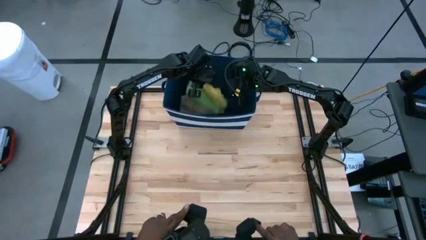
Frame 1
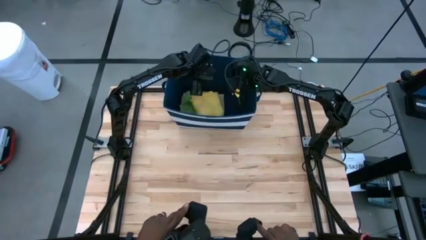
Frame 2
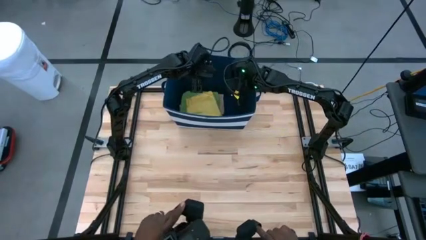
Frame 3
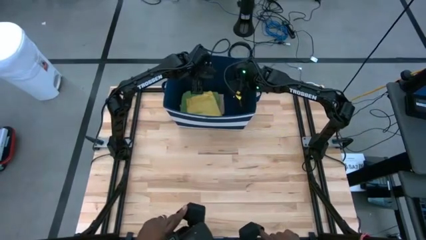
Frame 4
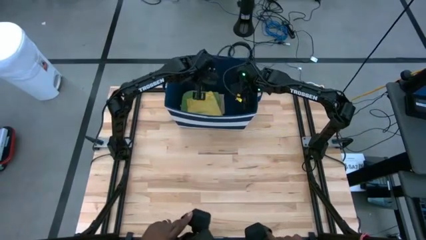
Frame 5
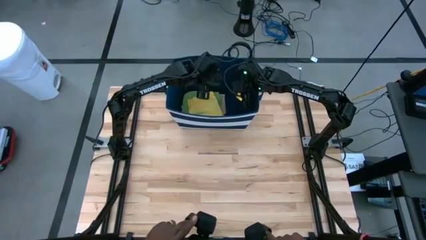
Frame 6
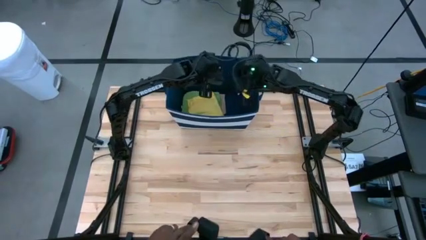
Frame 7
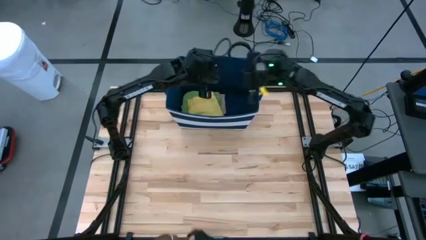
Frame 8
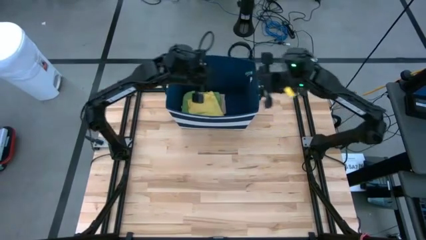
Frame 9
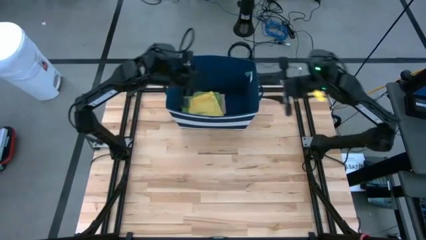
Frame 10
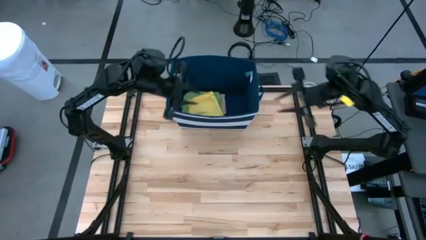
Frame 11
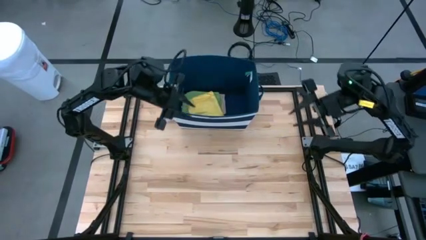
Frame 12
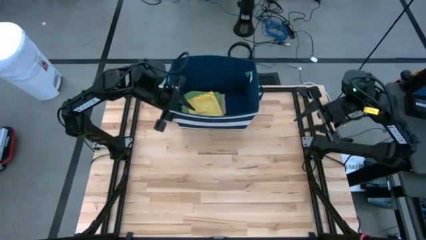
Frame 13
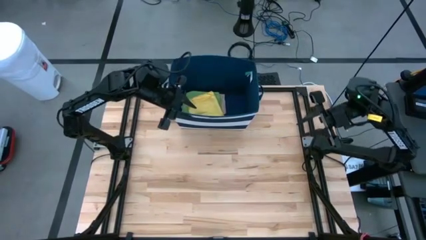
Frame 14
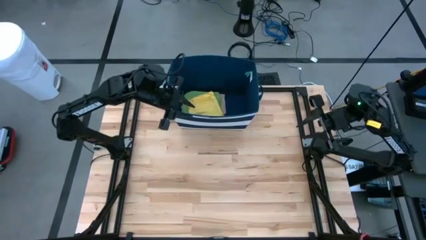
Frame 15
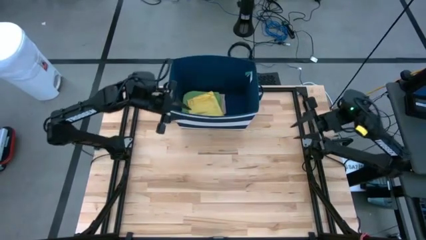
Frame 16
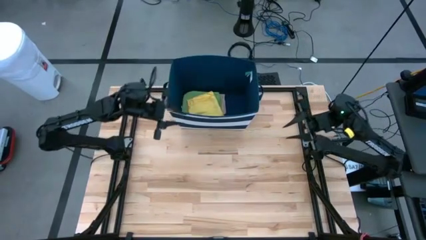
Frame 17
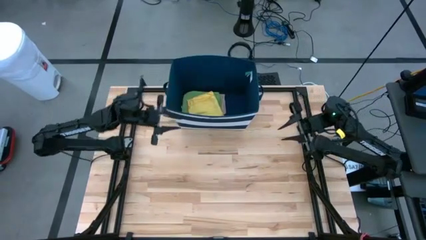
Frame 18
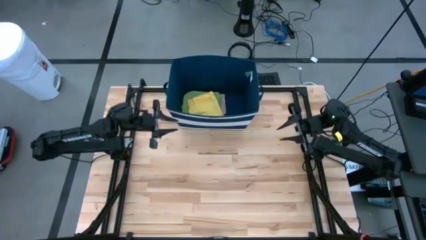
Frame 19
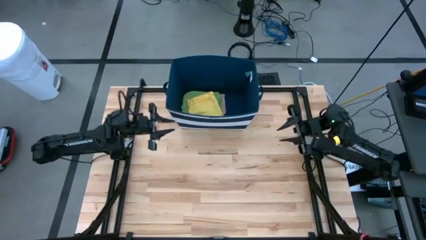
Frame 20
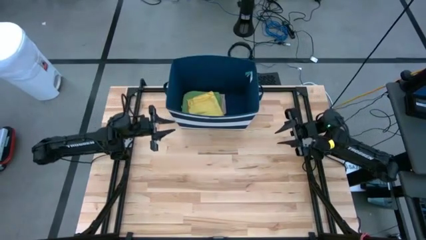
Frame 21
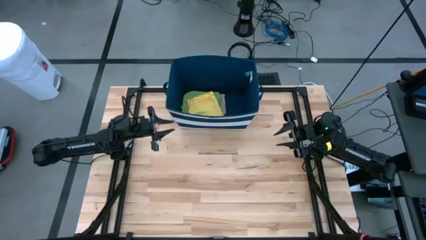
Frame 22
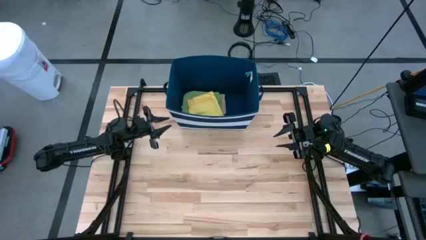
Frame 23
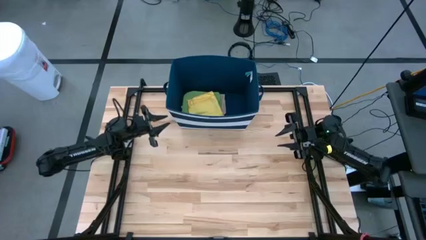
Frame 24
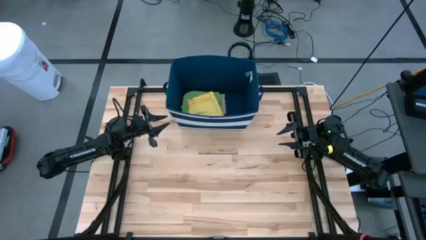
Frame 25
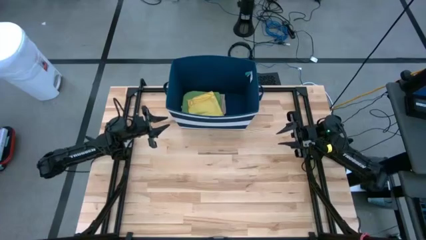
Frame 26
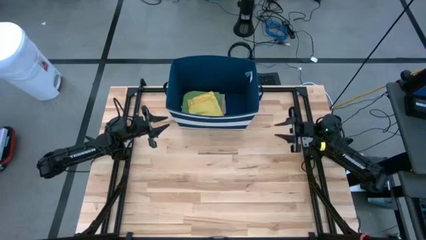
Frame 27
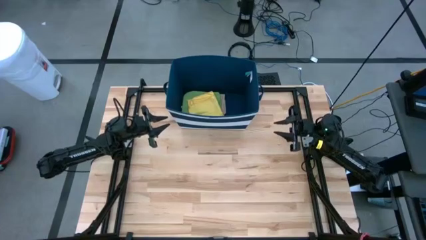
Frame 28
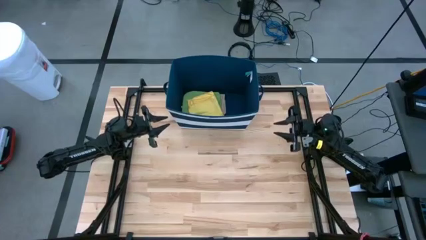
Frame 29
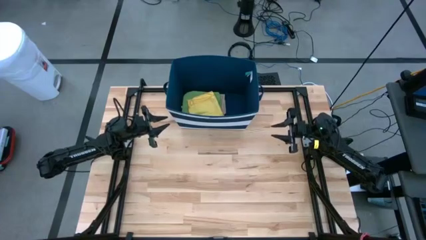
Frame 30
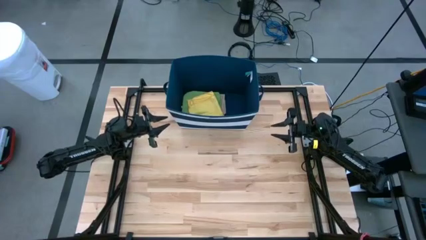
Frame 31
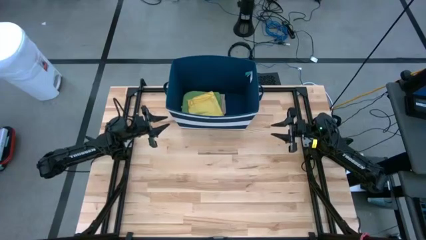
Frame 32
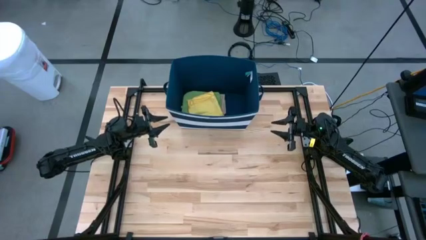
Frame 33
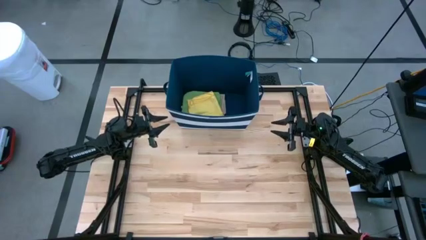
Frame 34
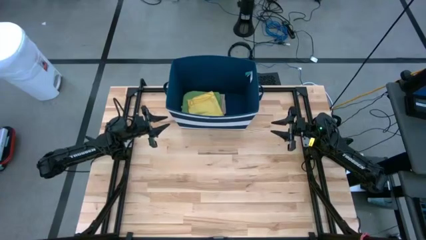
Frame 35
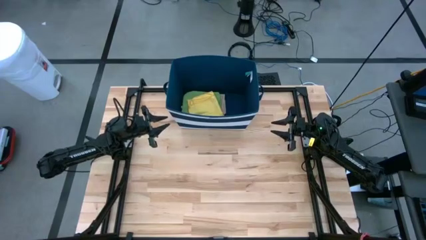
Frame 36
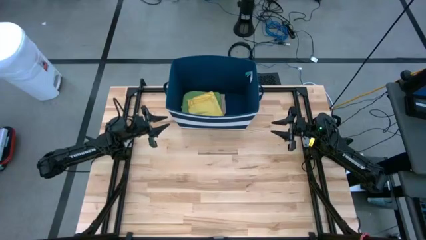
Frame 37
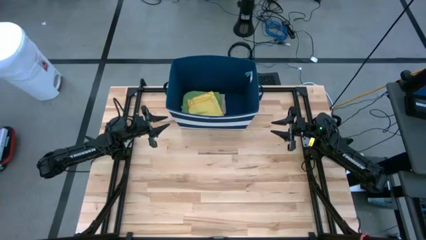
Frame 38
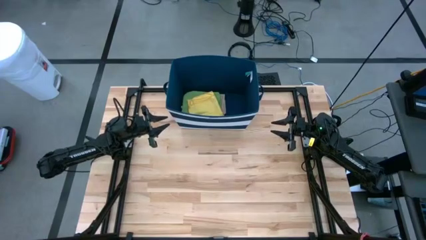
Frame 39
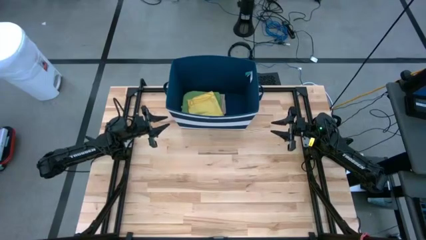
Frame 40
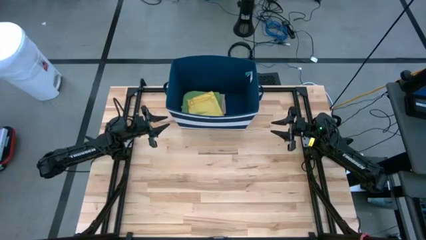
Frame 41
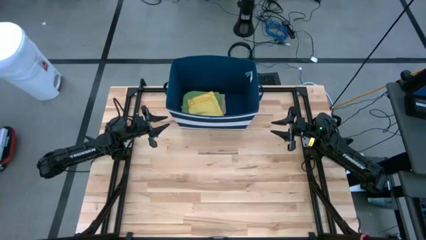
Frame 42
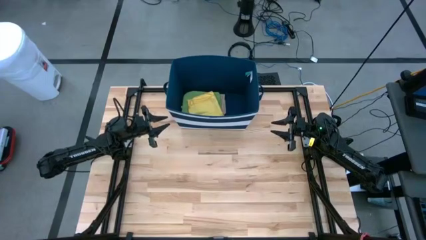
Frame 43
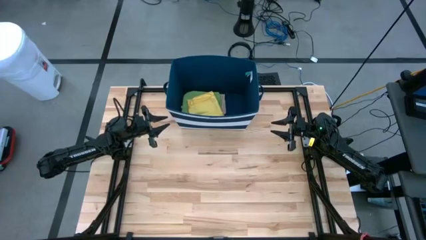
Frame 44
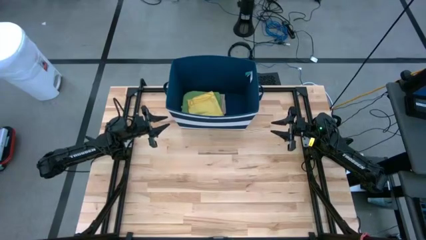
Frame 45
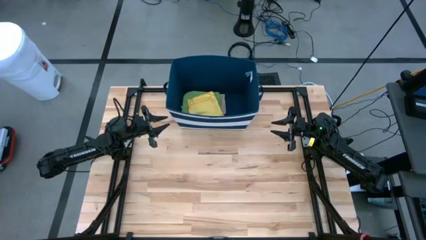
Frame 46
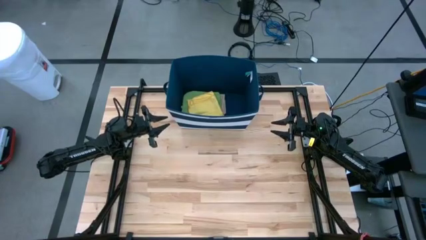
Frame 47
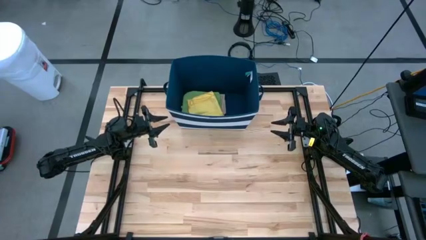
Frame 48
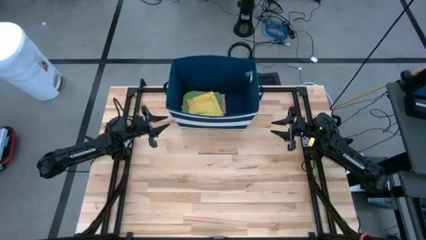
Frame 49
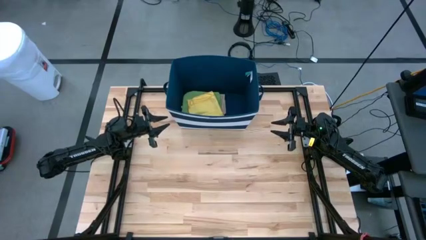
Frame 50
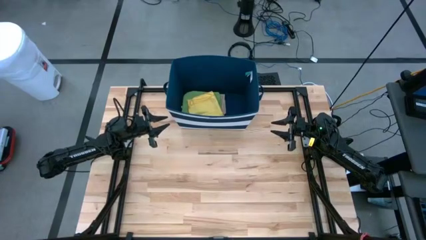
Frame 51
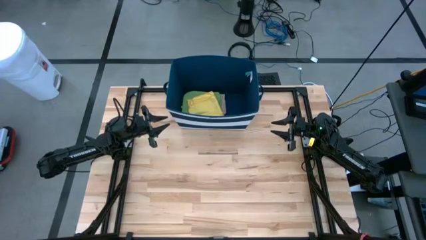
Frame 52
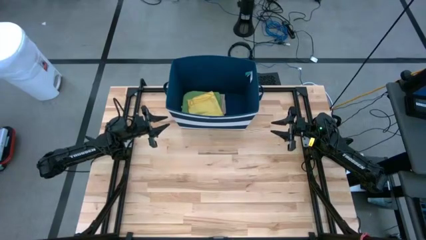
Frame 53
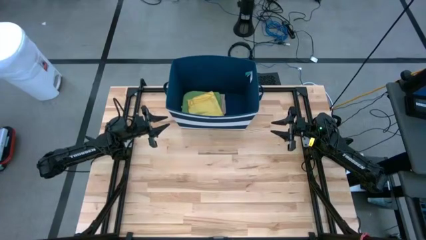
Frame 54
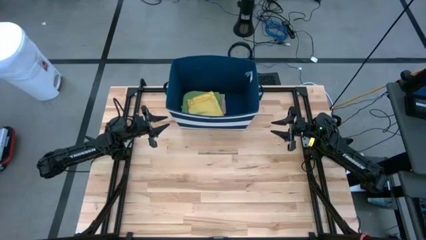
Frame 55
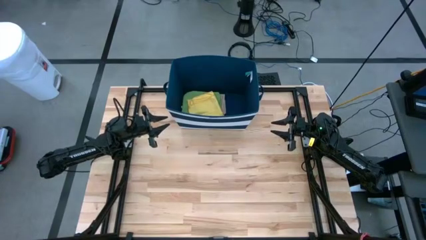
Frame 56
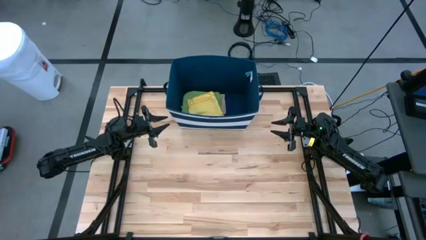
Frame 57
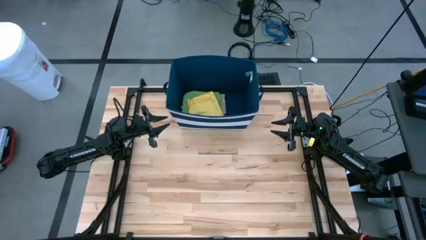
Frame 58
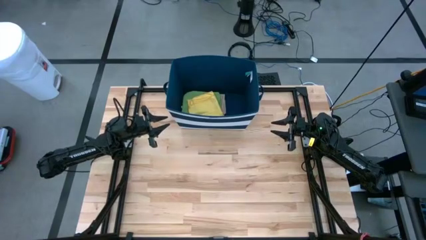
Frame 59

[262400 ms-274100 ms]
Task: Fold towel
Return to Home Position

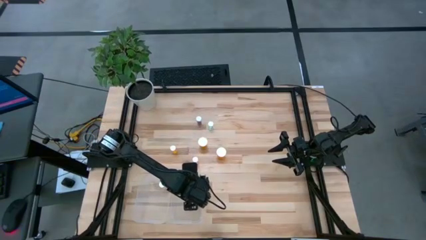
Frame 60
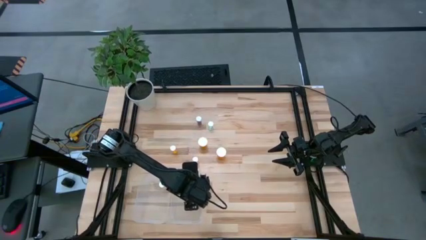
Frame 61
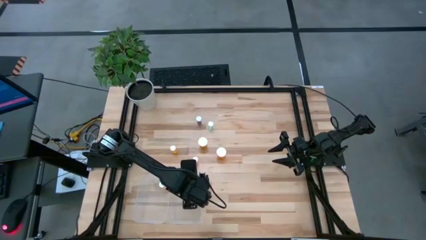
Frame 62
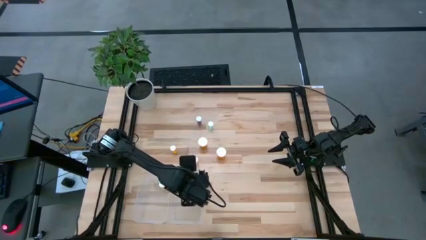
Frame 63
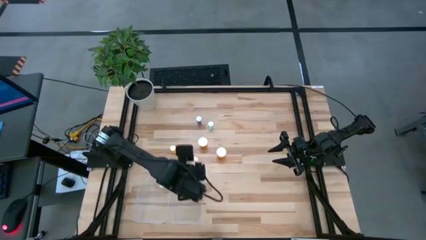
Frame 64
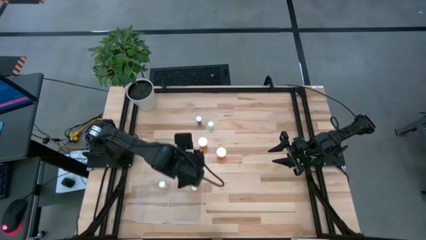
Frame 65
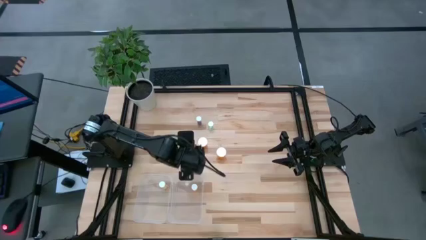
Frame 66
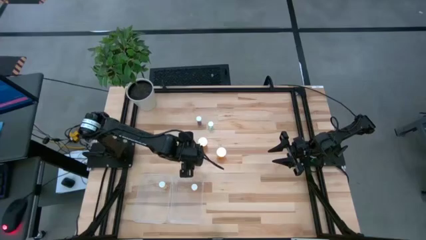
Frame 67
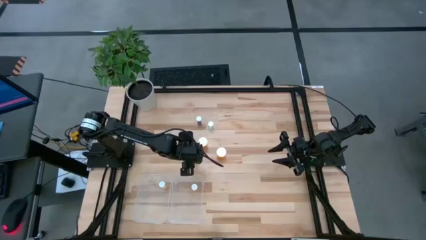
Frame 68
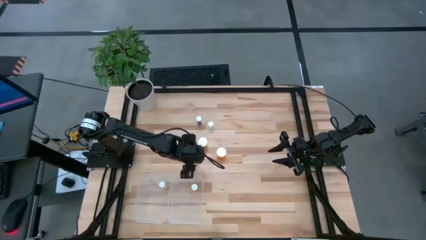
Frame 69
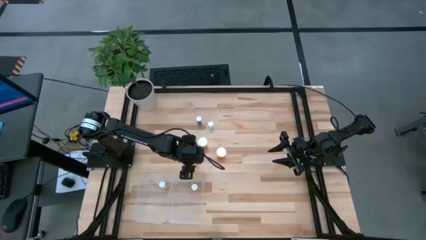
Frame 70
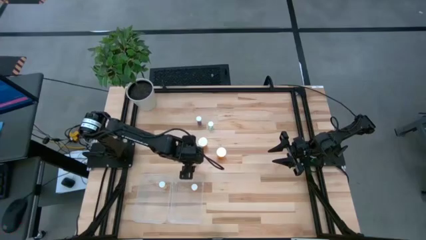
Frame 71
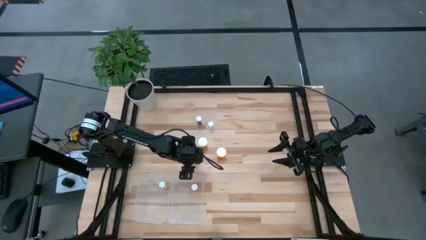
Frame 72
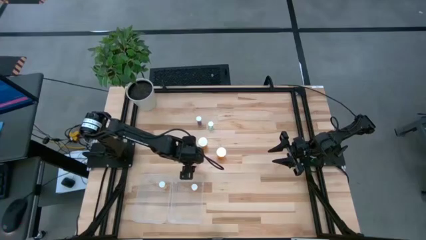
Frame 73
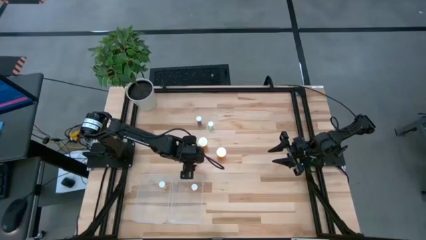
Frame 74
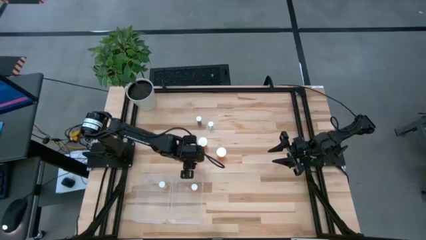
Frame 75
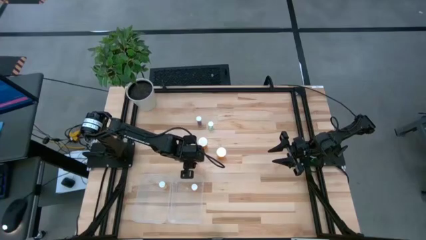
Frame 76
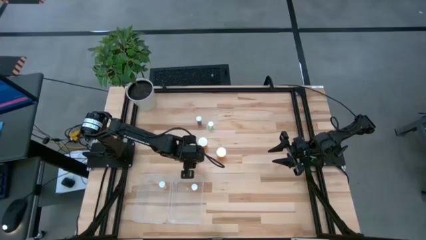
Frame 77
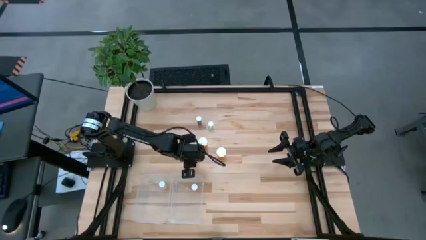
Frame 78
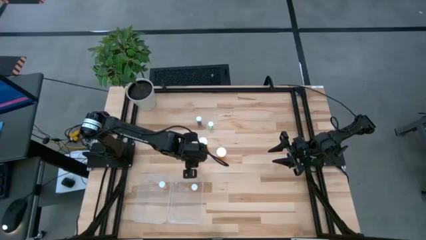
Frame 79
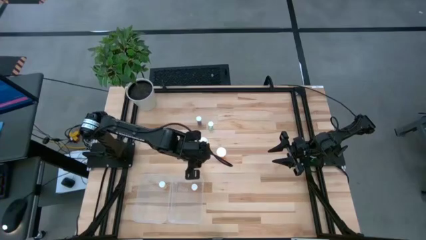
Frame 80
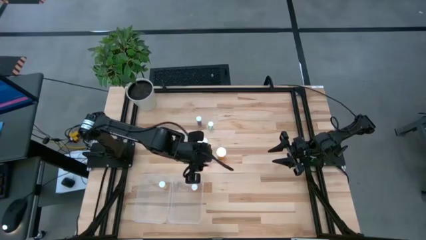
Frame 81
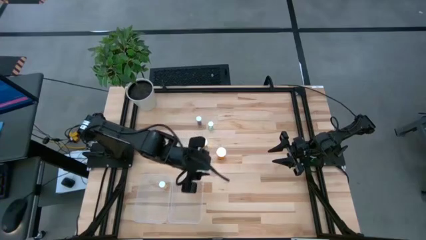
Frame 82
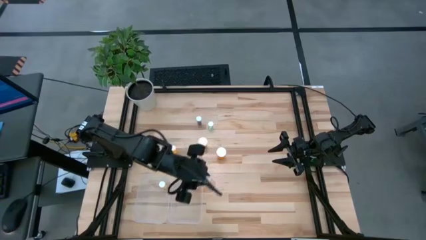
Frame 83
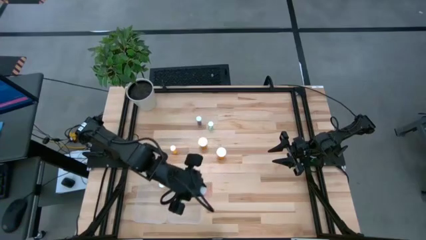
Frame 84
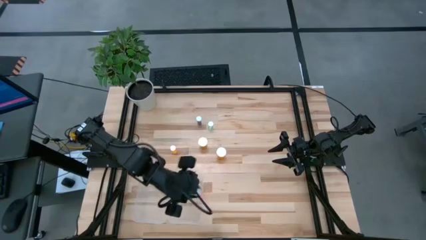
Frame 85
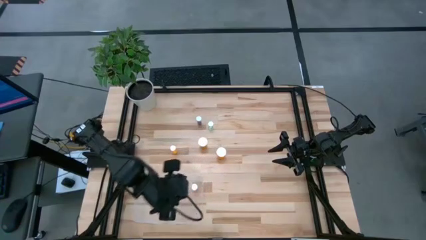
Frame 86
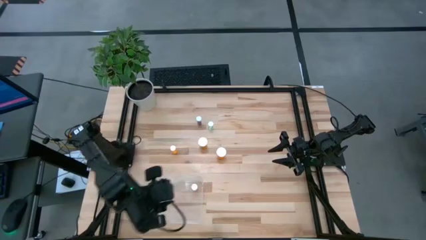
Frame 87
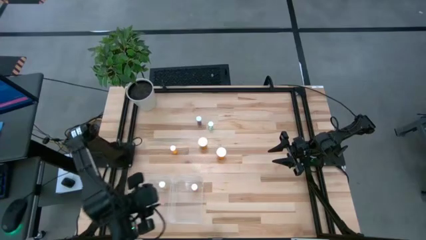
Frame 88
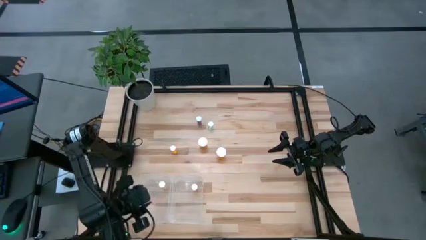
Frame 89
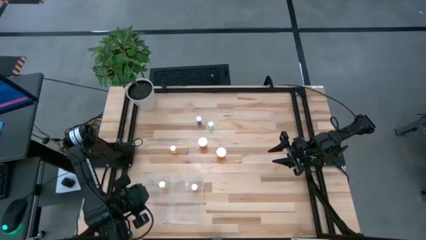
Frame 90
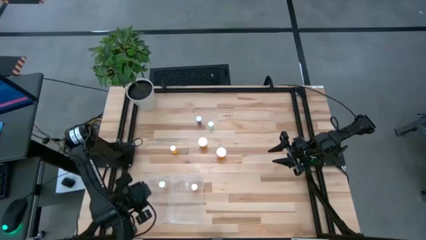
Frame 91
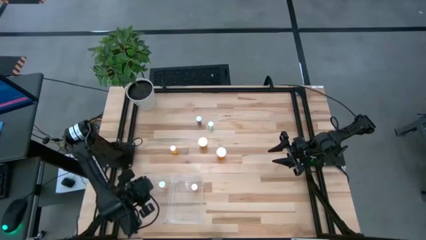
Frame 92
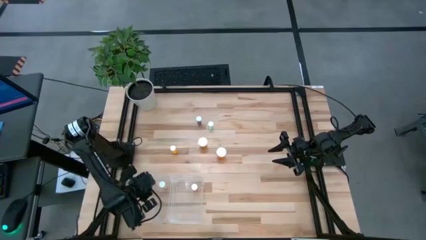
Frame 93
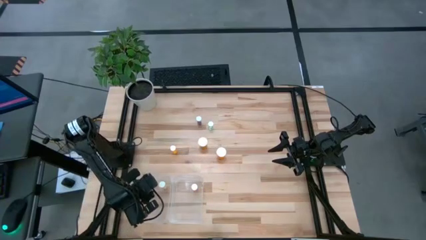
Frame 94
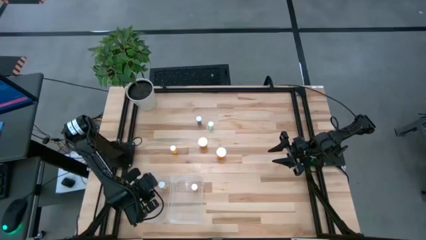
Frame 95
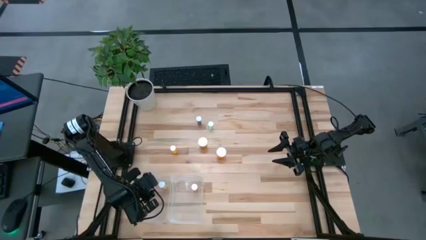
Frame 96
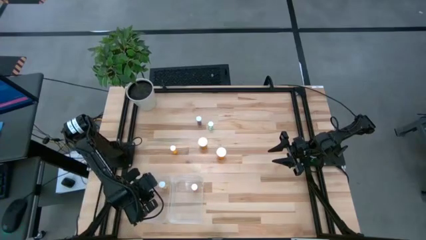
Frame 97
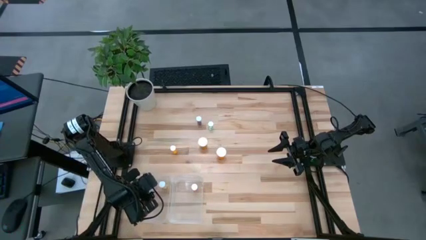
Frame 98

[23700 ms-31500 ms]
Task: Pick and place medicine bottles into bin by pill shape (circle, oval)
Put the small pink tablet bottle into the left transparent bin
